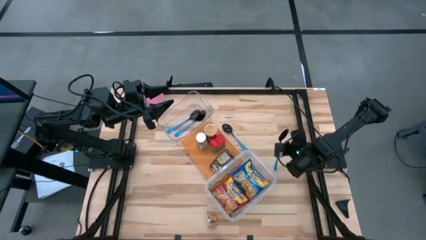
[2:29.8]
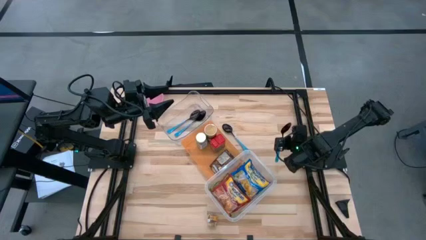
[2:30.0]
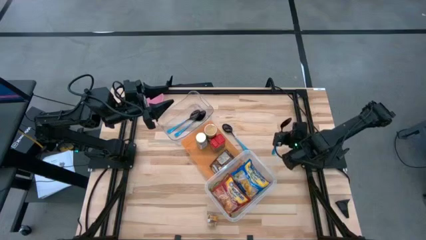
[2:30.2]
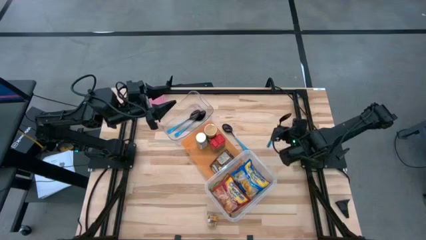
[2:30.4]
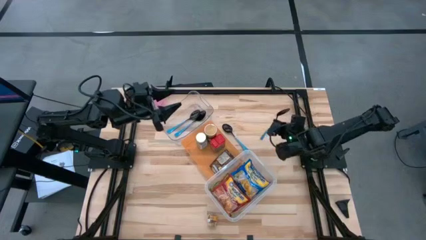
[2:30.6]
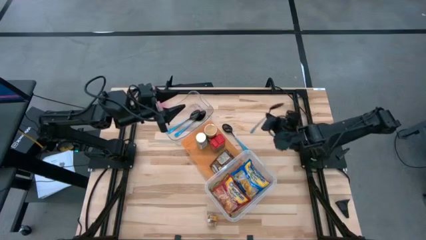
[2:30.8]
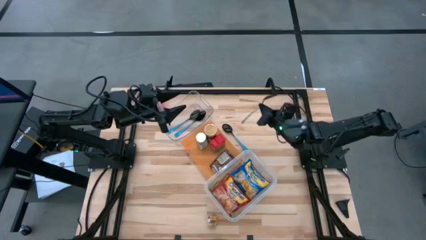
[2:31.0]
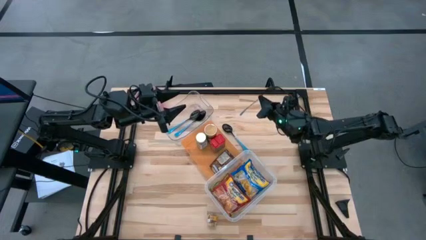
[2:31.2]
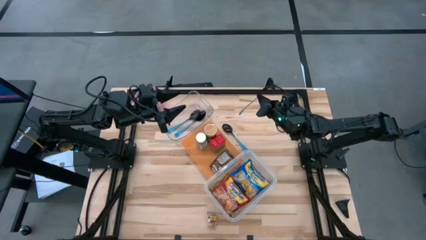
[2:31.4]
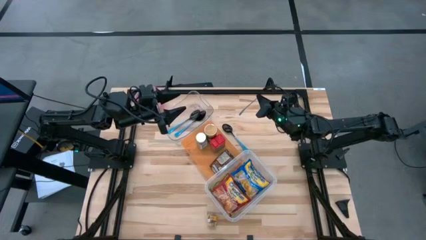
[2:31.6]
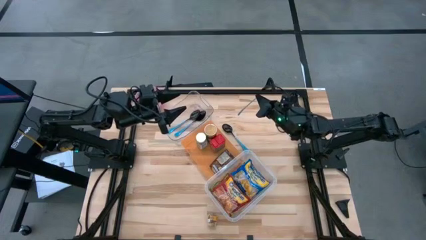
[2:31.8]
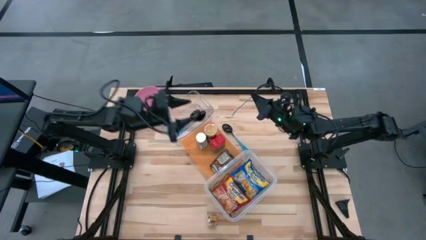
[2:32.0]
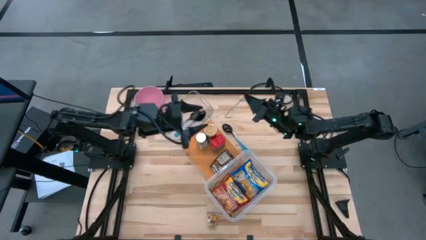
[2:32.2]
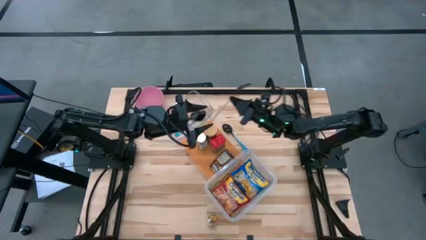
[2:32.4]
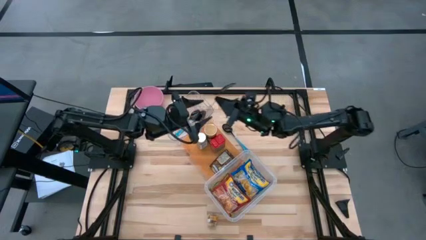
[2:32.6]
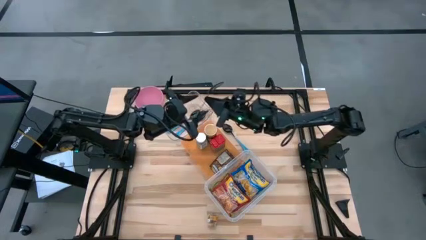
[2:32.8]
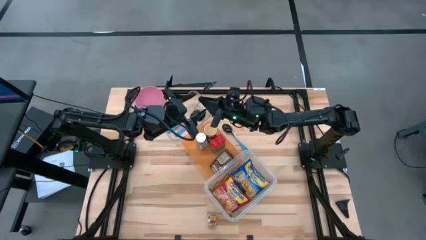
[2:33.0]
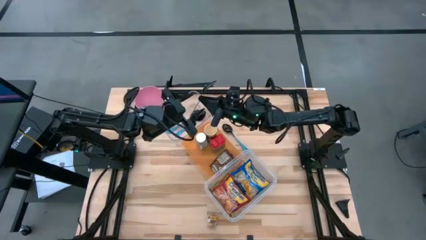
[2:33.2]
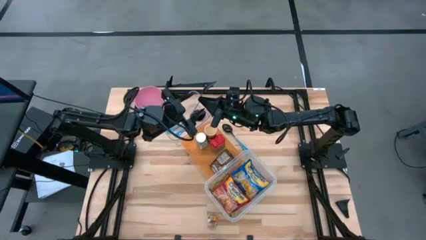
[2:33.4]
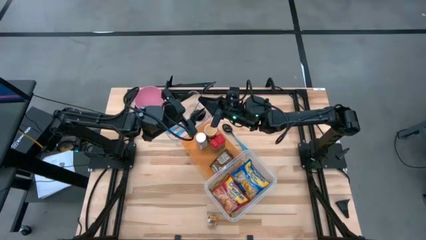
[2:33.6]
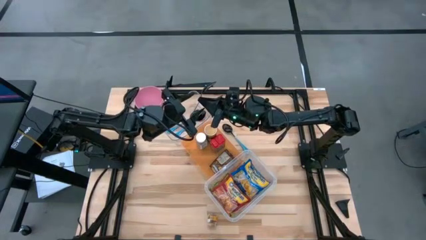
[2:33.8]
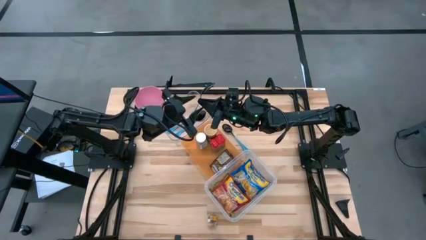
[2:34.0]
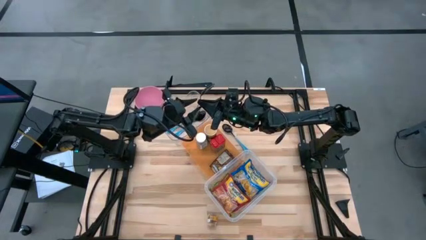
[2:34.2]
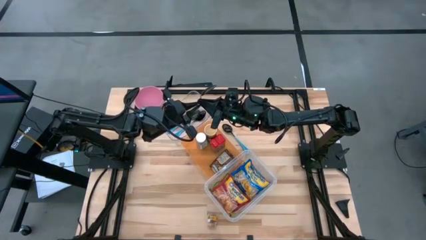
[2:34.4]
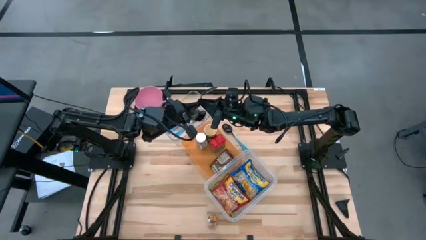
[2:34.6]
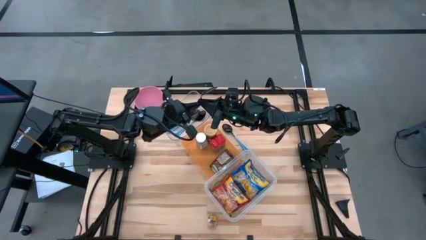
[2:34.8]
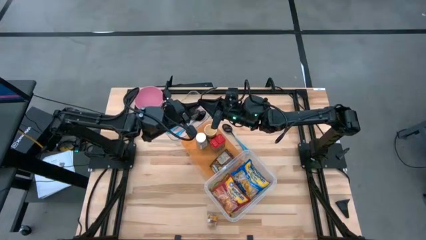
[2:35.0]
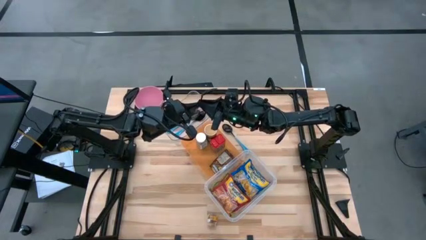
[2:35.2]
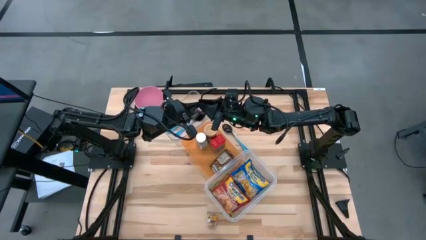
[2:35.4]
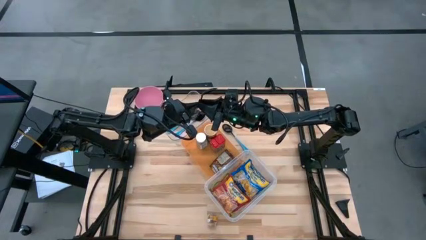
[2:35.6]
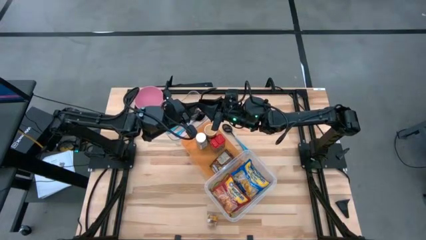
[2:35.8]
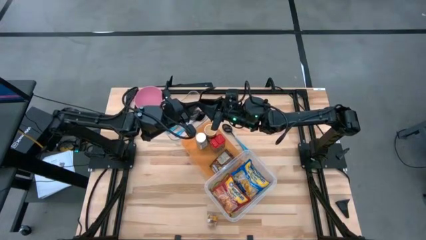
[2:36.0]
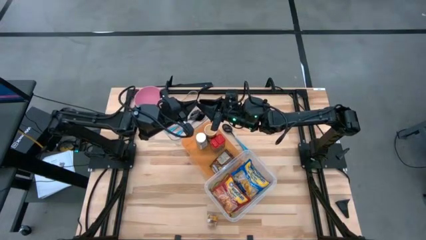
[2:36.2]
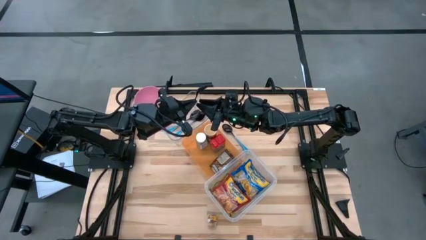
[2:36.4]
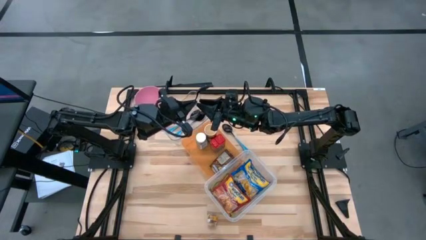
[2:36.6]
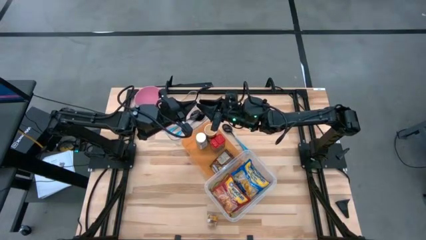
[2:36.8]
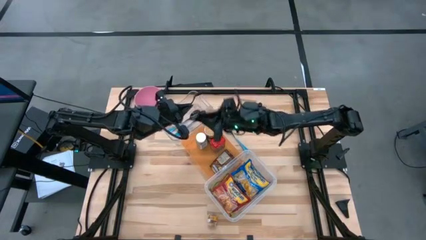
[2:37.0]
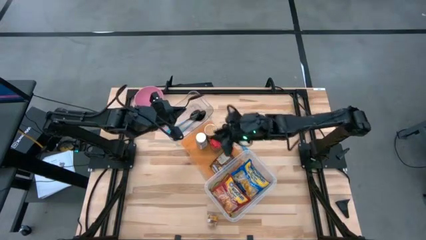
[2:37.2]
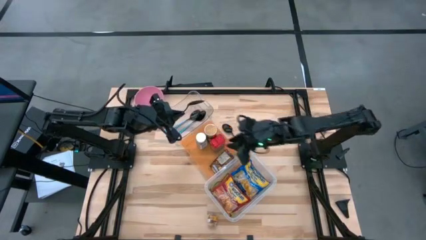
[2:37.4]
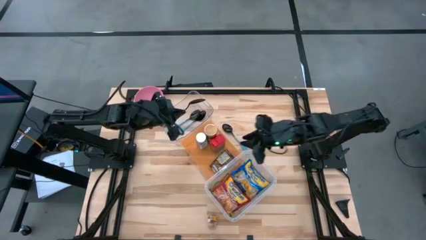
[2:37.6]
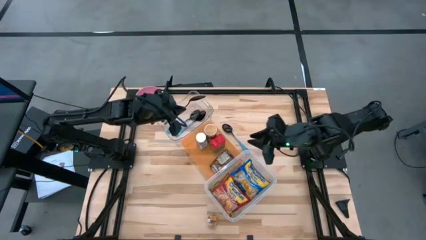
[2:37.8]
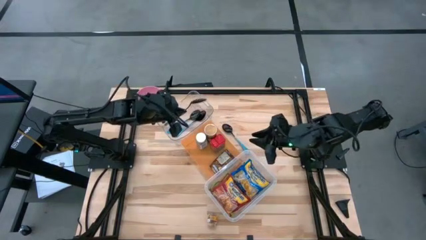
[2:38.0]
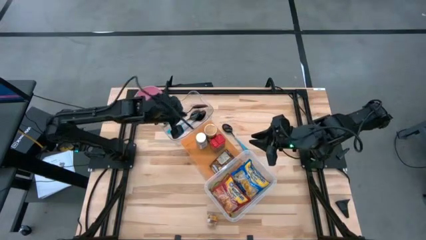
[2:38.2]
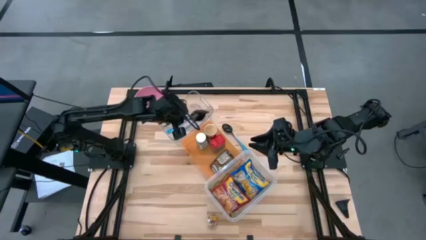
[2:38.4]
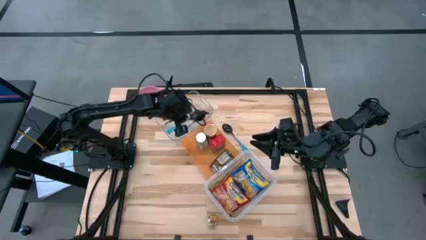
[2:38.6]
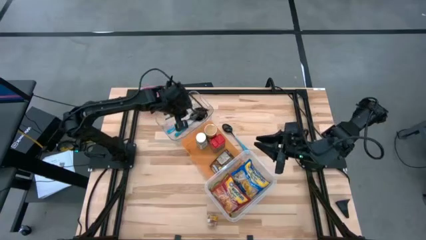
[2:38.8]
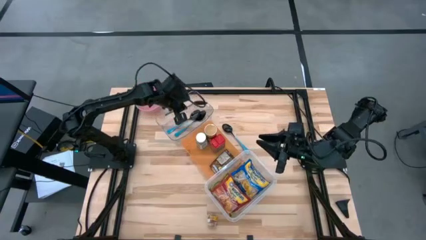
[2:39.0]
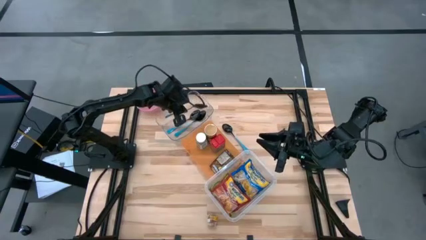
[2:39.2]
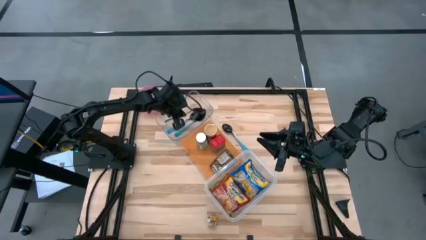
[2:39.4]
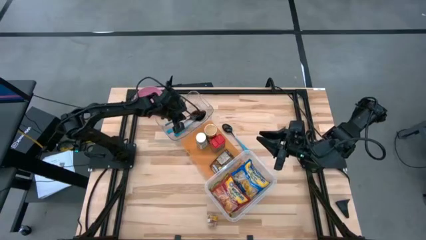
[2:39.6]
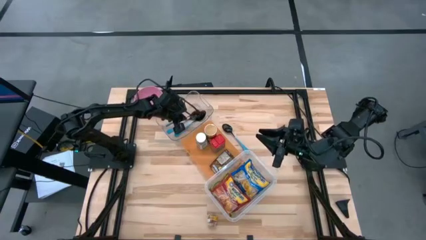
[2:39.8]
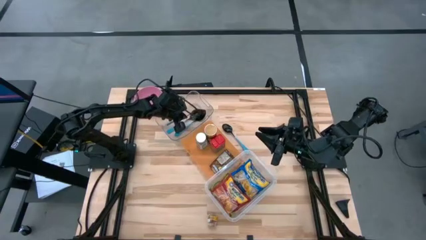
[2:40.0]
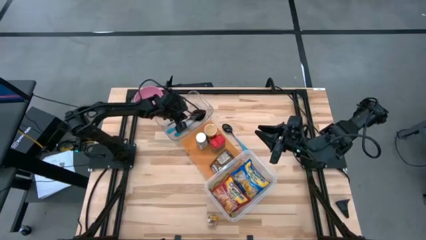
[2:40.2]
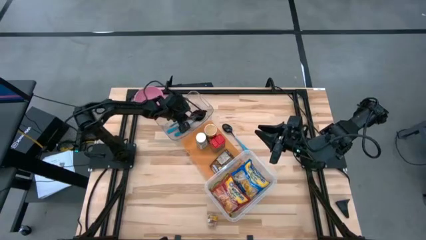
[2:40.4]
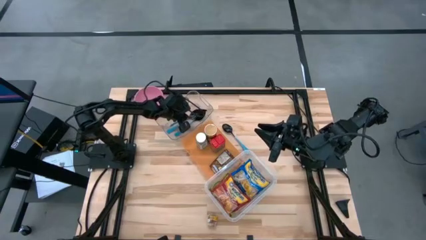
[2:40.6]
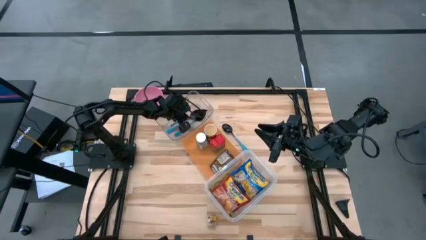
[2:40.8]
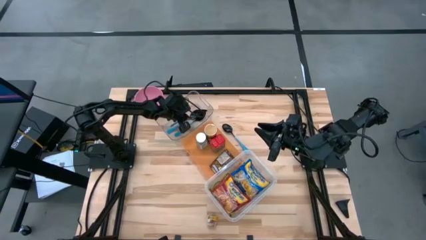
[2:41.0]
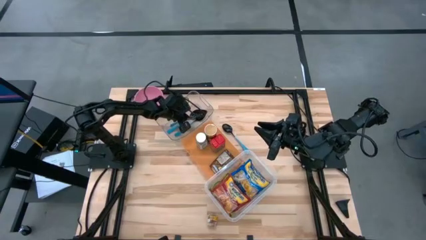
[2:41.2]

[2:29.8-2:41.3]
Task: Pick & Place Food Item
Put the blue spoon into the top transparent bin
